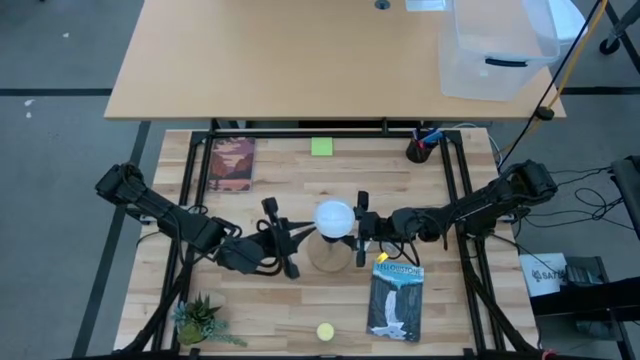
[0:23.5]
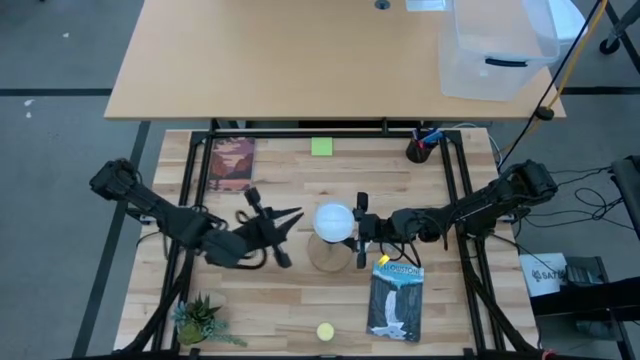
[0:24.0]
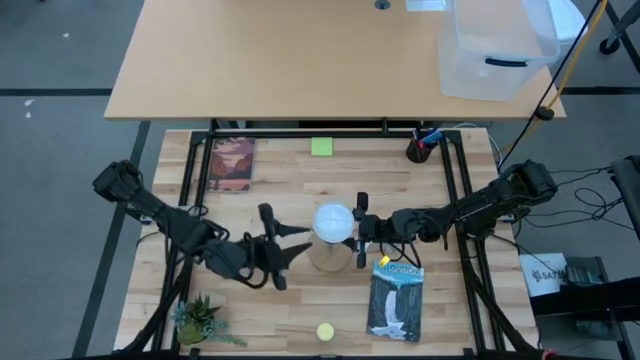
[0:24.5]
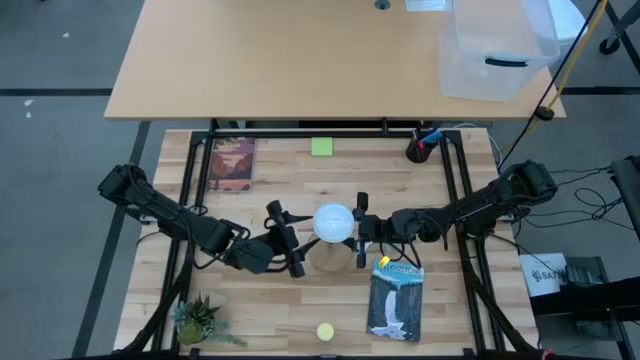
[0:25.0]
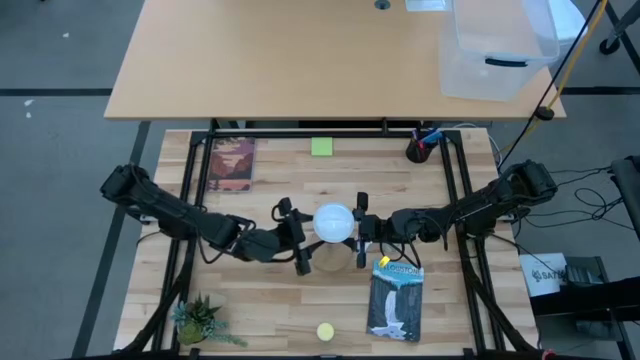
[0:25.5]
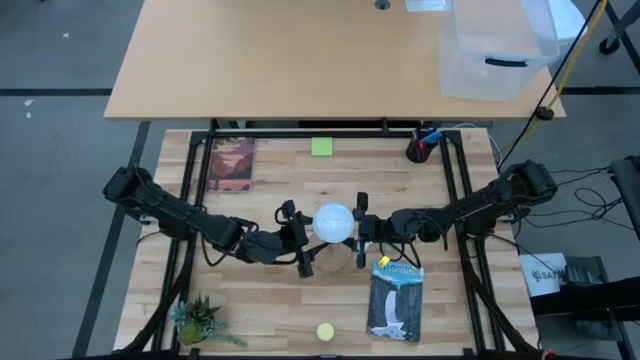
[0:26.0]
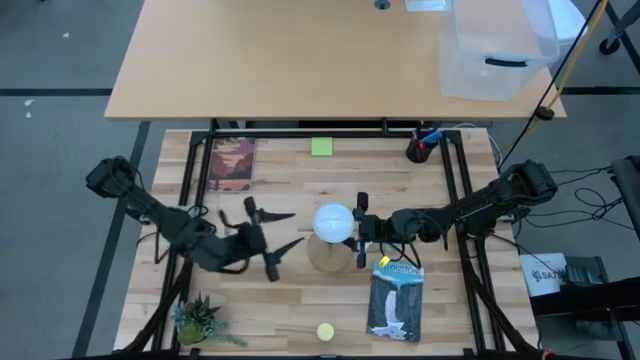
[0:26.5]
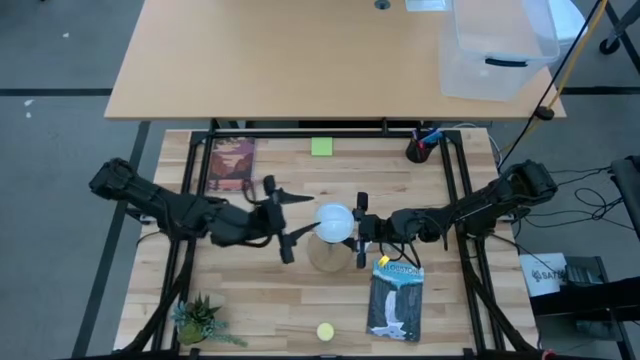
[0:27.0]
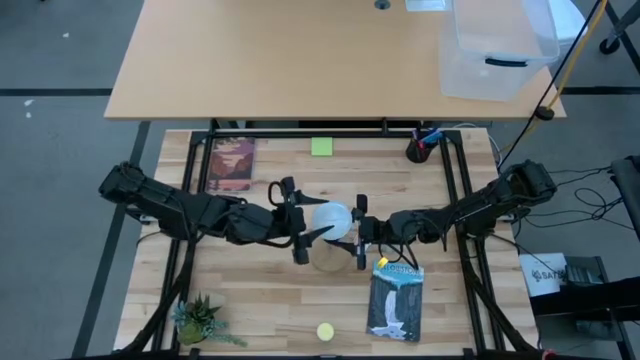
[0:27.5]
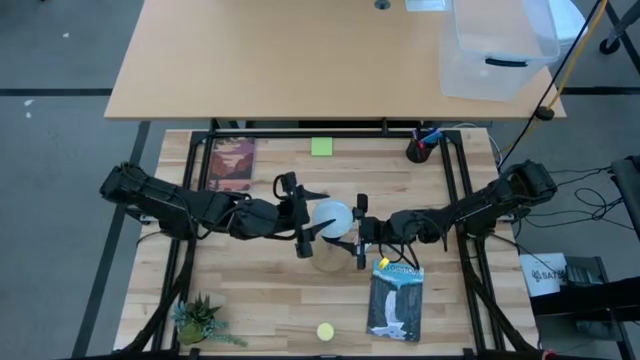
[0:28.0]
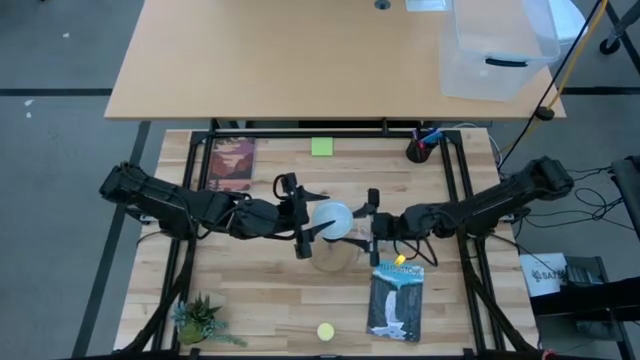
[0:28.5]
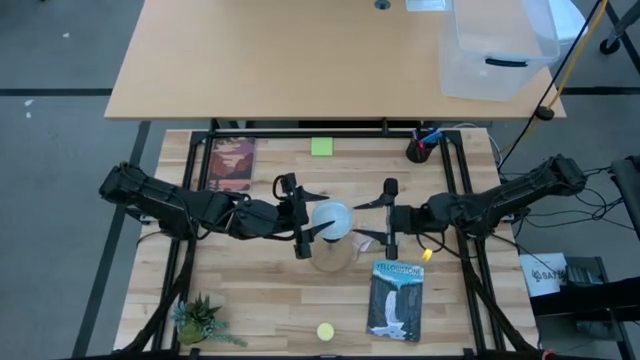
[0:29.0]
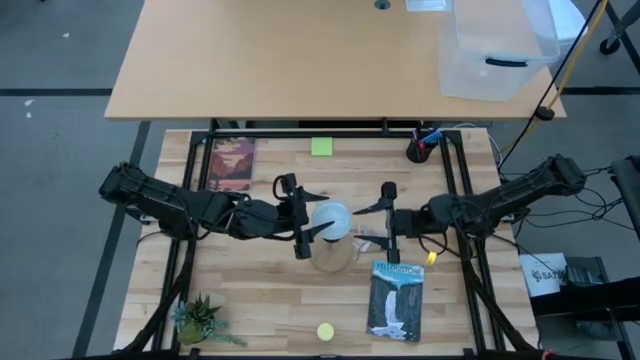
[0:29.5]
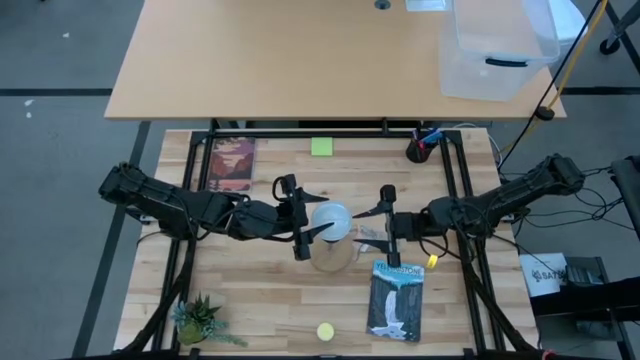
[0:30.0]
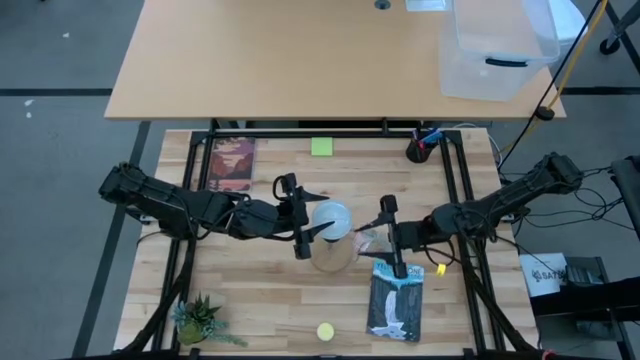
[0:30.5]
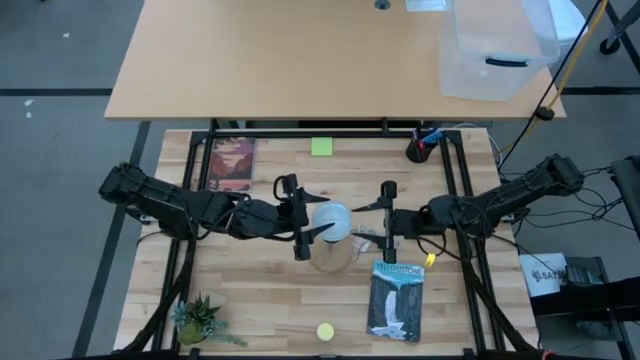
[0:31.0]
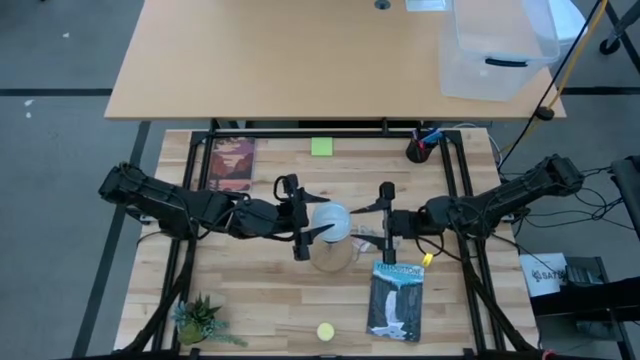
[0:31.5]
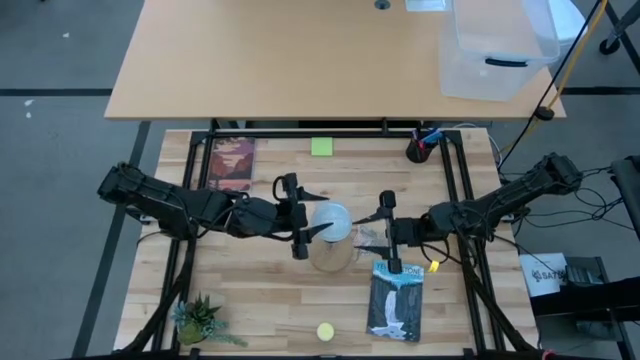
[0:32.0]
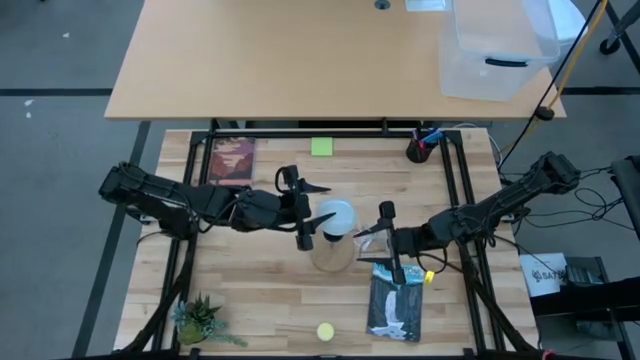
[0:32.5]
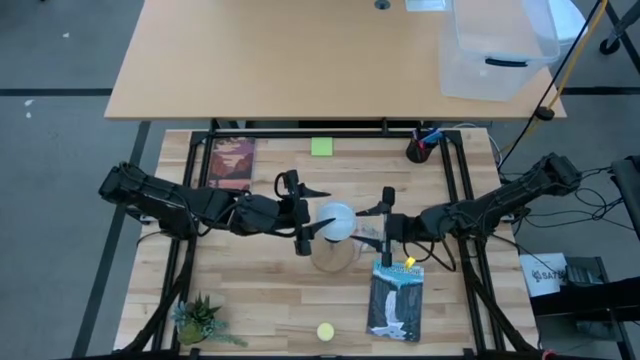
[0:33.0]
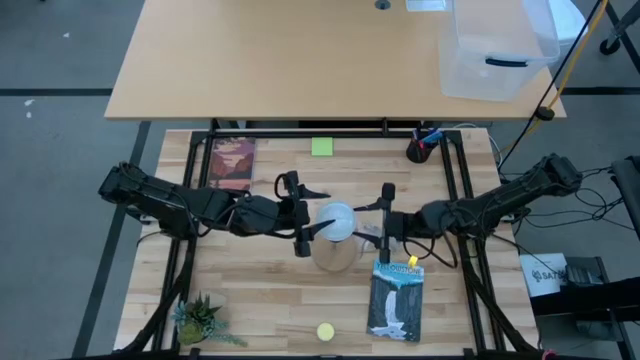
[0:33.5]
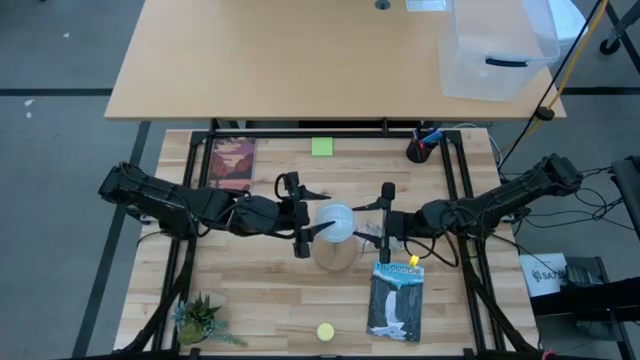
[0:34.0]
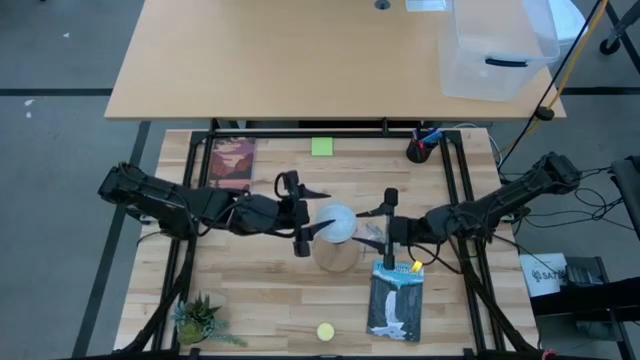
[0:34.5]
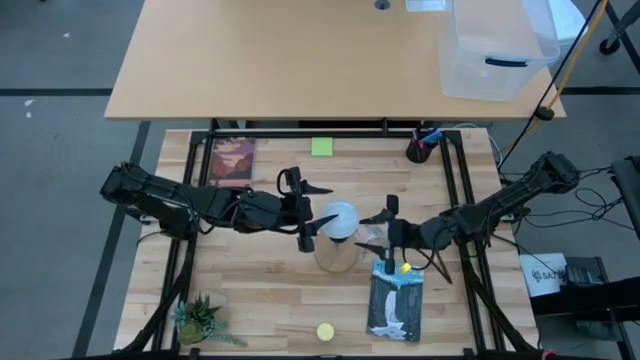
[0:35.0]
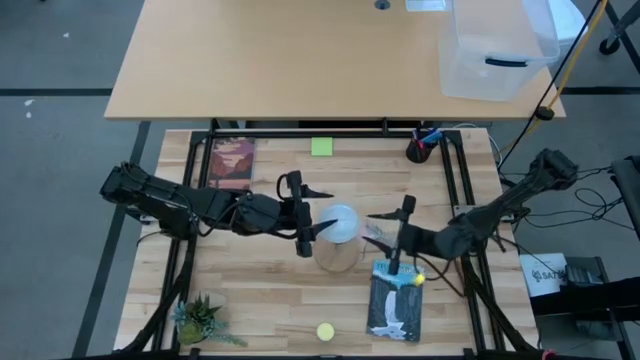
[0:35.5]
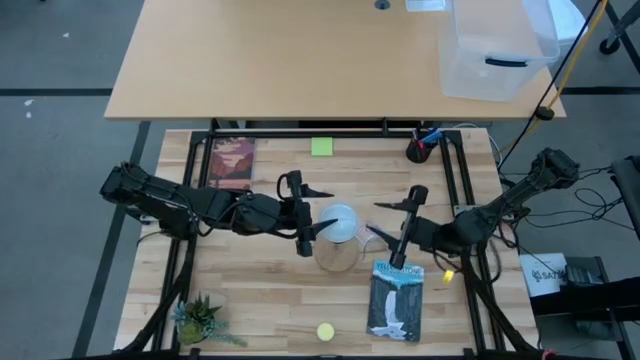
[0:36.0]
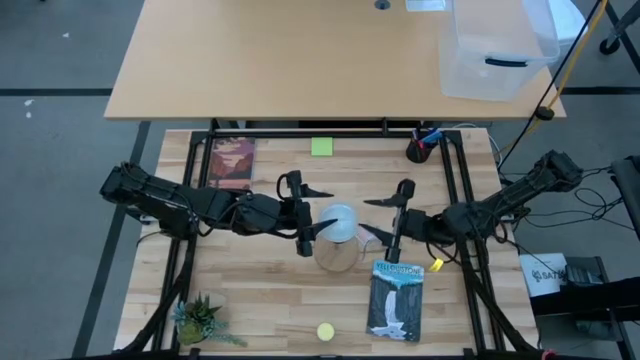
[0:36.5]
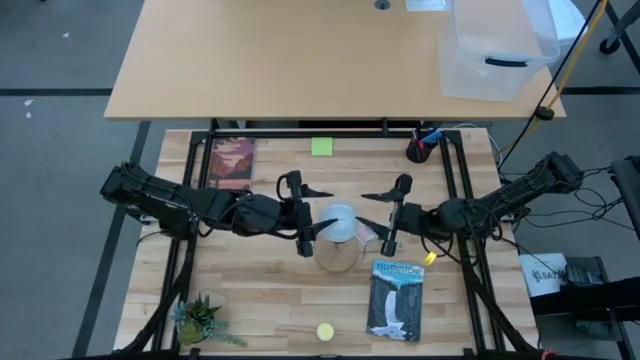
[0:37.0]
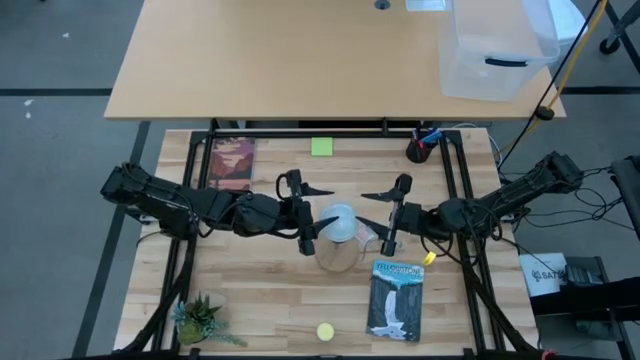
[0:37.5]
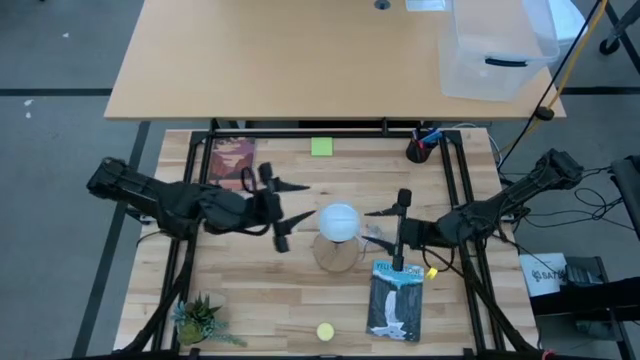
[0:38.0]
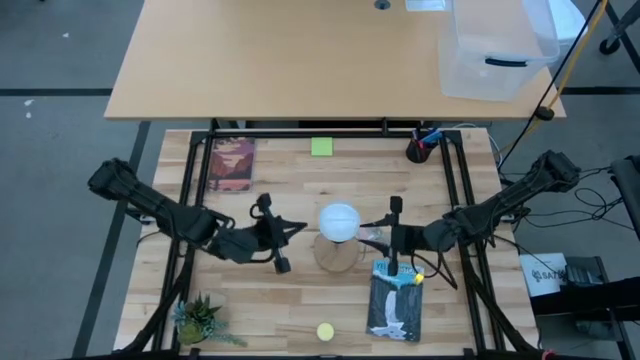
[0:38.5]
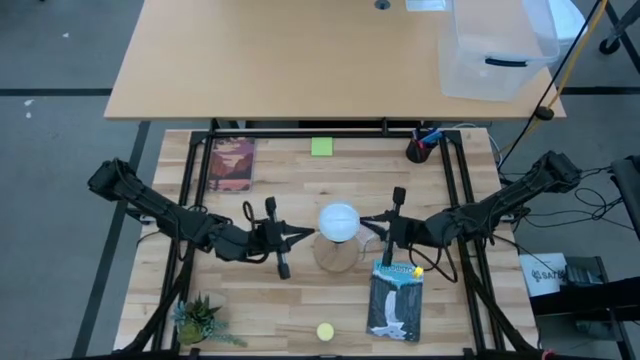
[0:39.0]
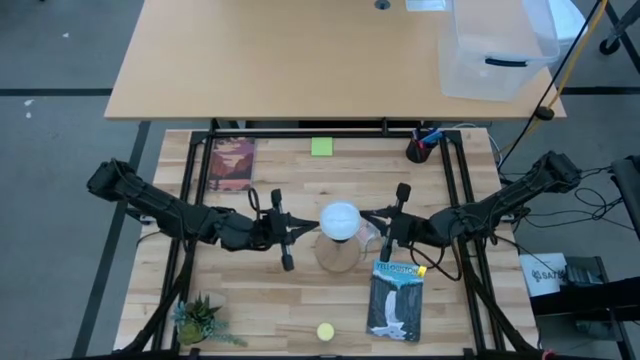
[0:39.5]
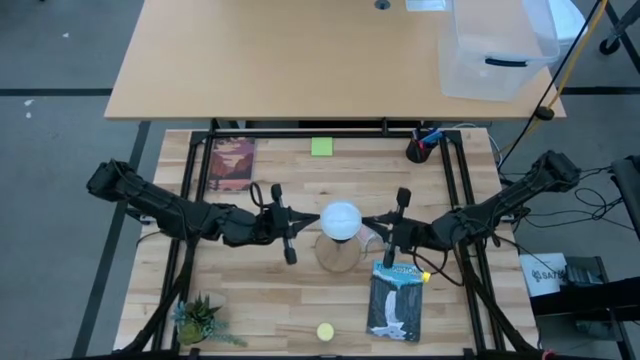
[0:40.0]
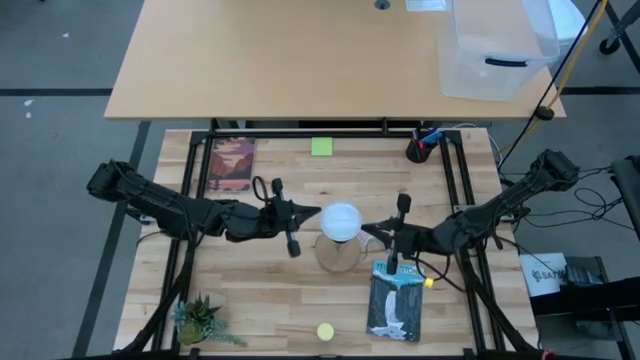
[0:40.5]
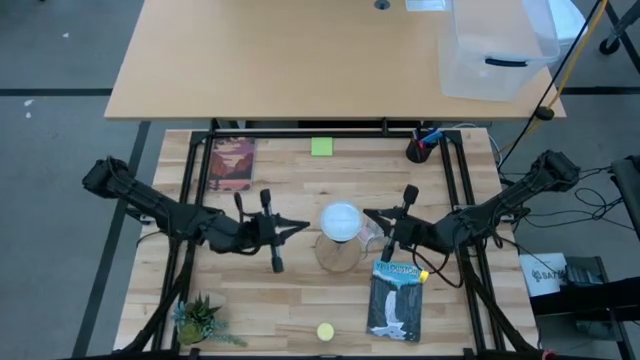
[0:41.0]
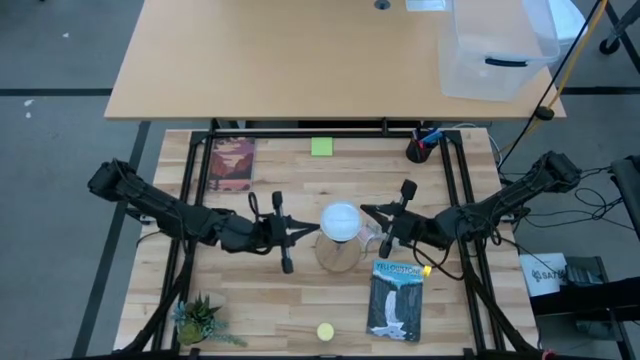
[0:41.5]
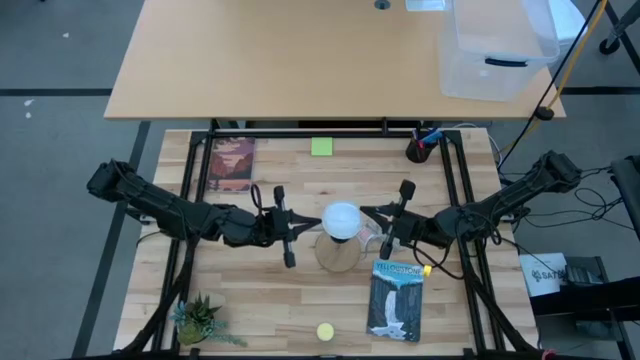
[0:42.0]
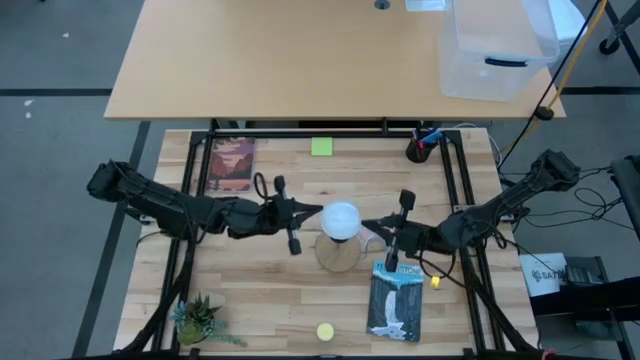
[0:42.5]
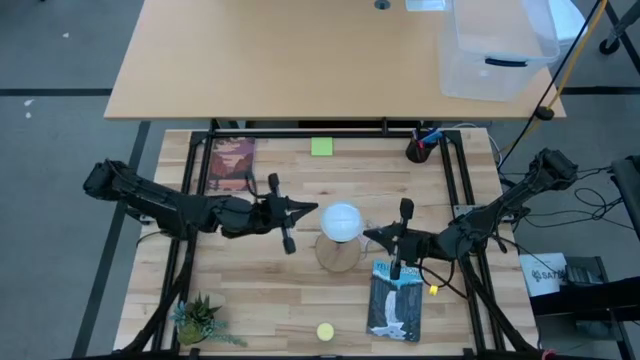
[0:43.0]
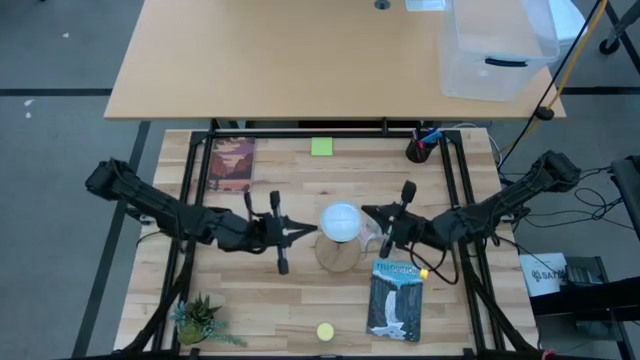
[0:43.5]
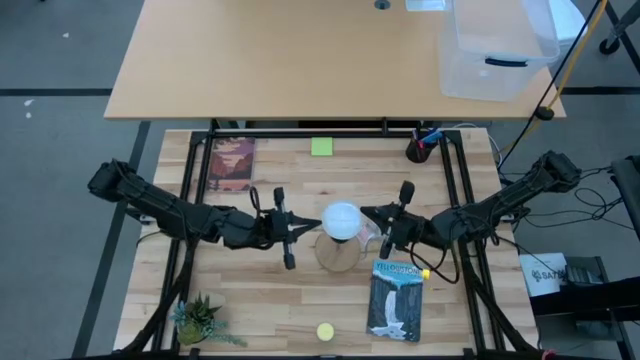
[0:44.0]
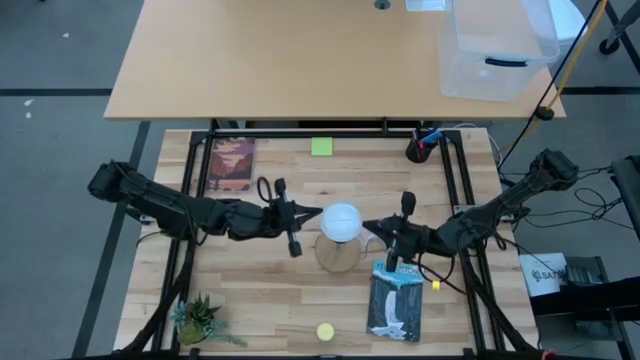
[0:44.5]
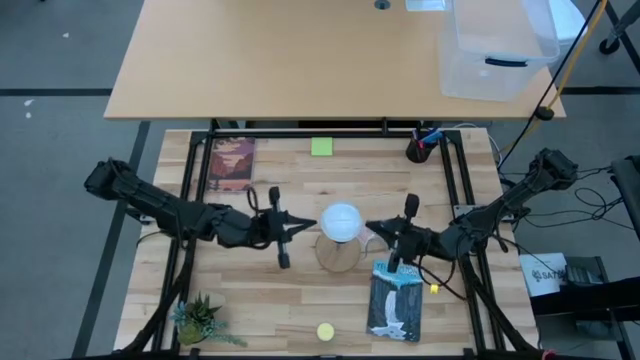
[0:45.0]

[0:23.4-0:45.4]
Task: Screw lightbulb
Insert the white lightbulb into the brown lamp
